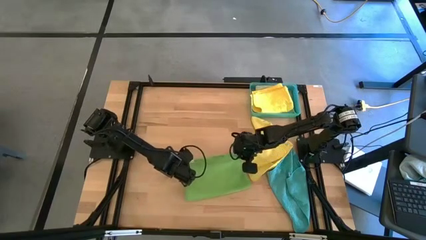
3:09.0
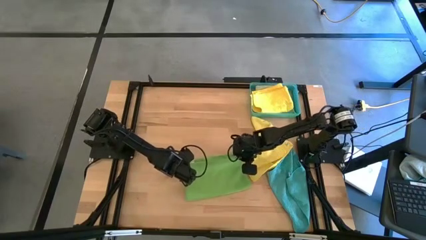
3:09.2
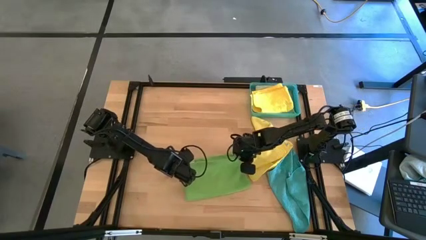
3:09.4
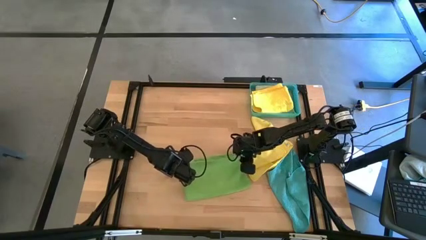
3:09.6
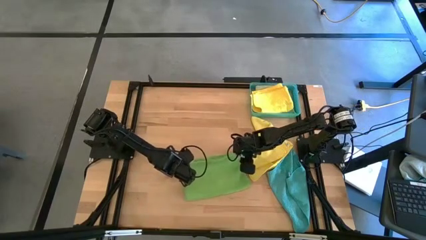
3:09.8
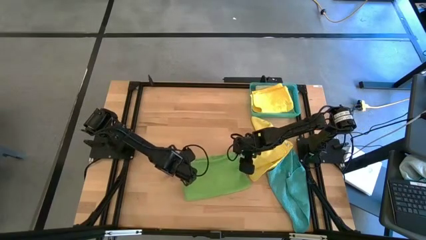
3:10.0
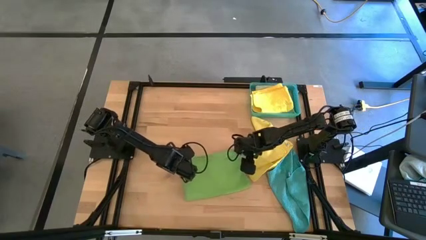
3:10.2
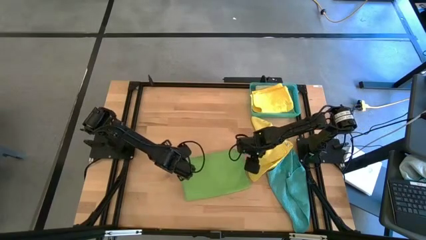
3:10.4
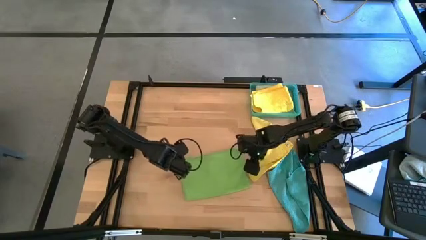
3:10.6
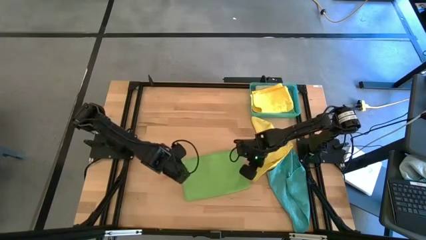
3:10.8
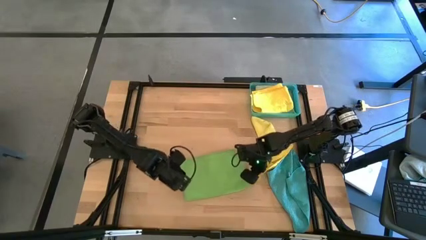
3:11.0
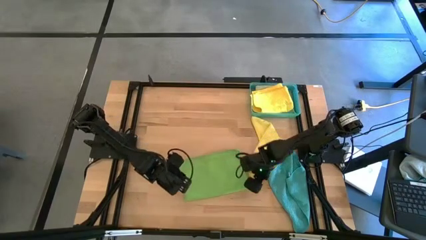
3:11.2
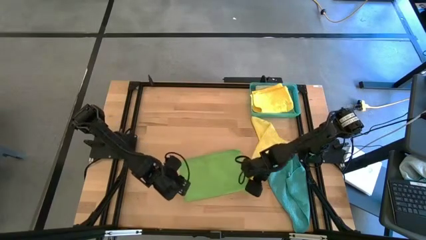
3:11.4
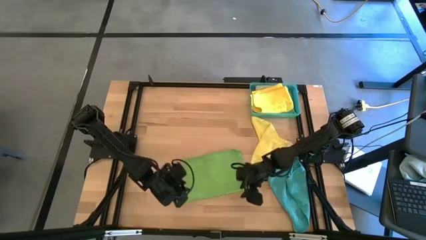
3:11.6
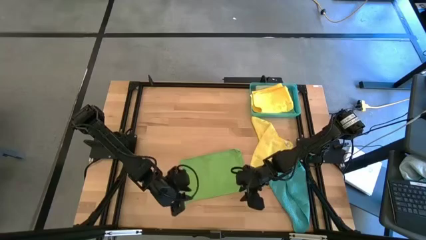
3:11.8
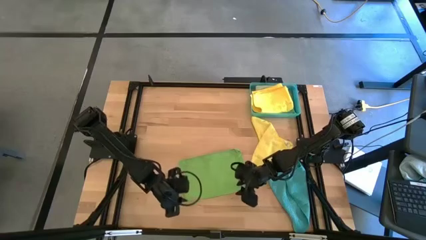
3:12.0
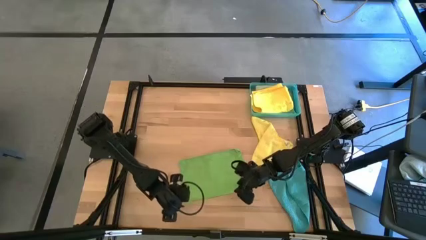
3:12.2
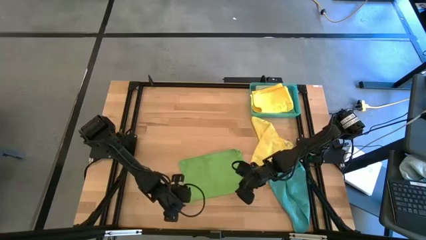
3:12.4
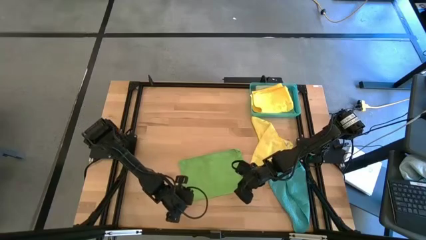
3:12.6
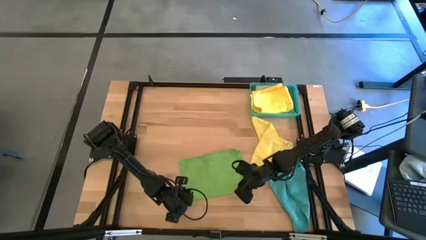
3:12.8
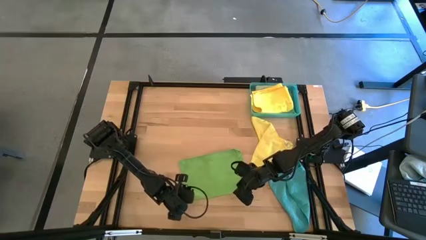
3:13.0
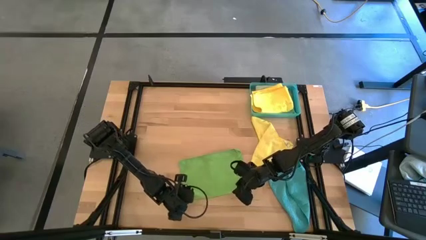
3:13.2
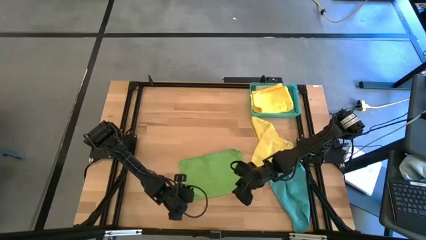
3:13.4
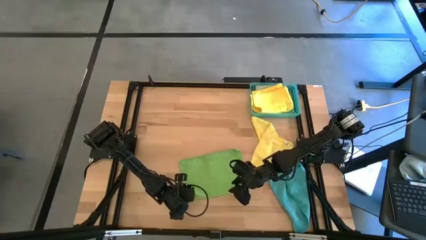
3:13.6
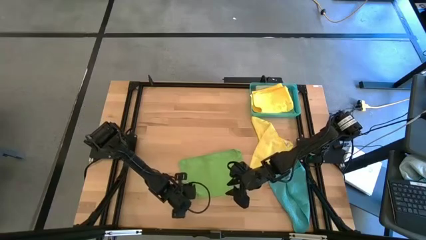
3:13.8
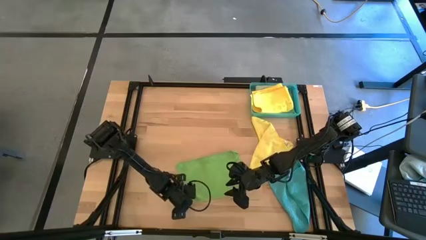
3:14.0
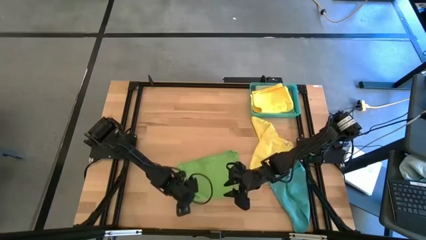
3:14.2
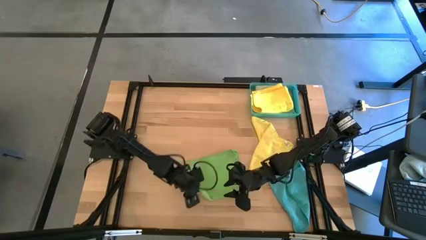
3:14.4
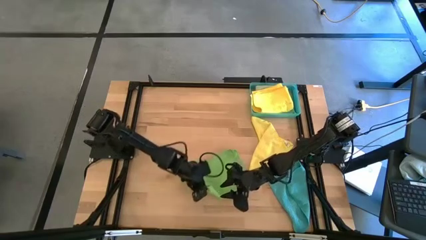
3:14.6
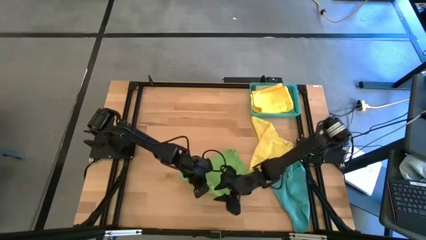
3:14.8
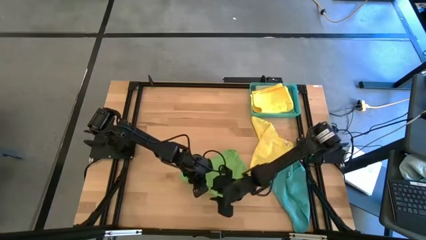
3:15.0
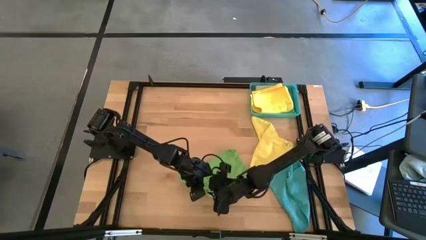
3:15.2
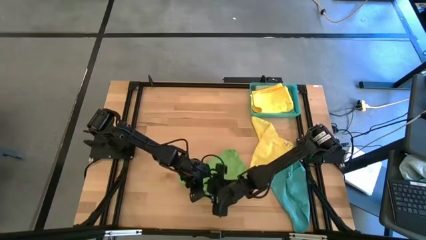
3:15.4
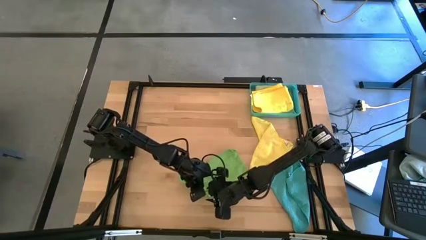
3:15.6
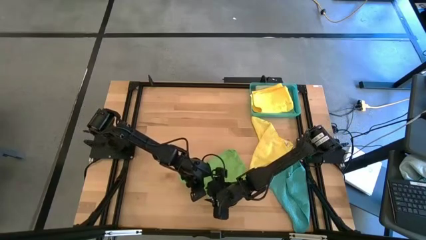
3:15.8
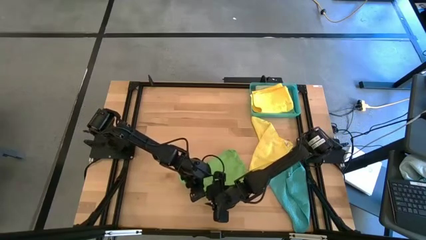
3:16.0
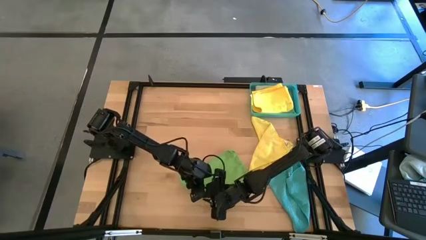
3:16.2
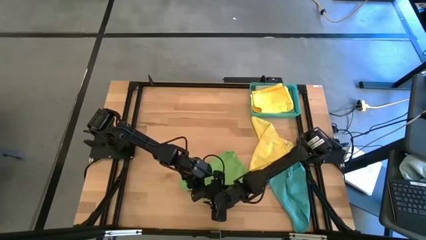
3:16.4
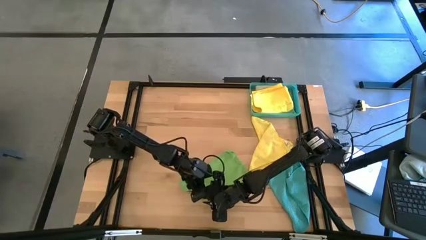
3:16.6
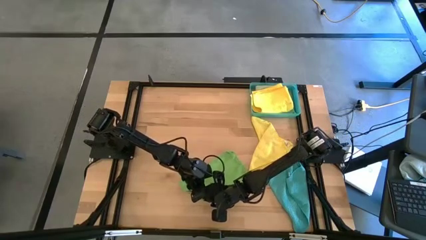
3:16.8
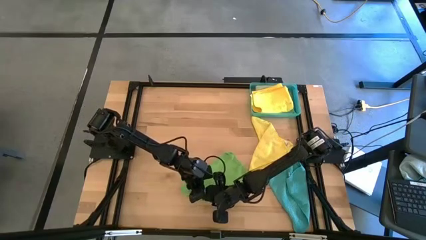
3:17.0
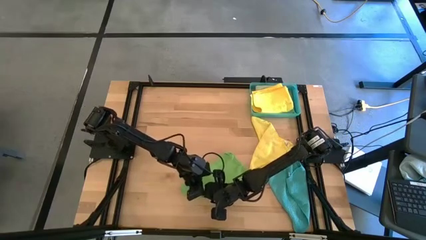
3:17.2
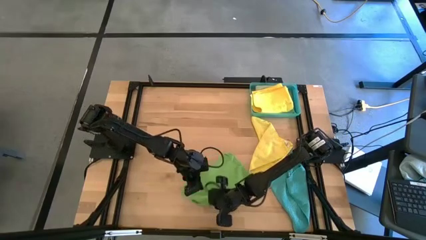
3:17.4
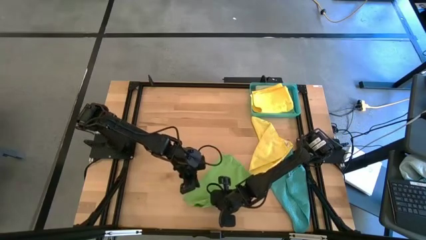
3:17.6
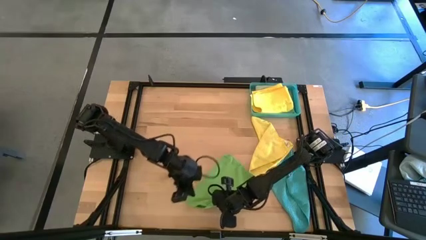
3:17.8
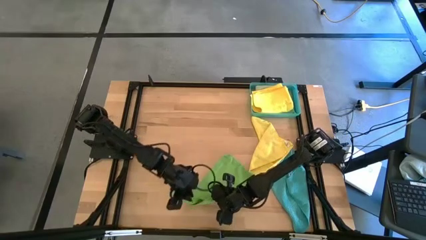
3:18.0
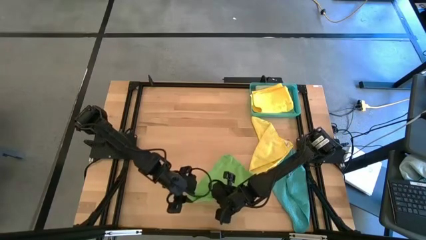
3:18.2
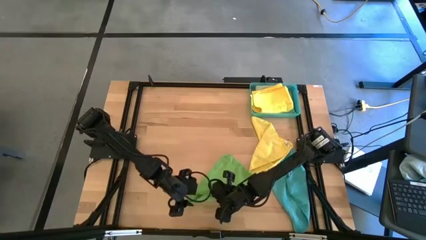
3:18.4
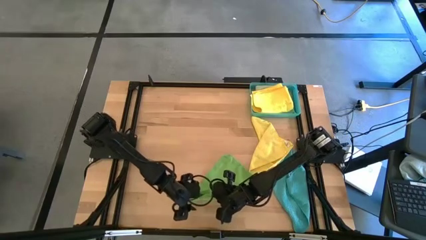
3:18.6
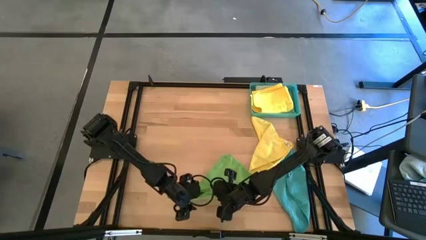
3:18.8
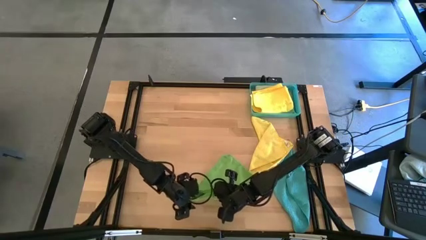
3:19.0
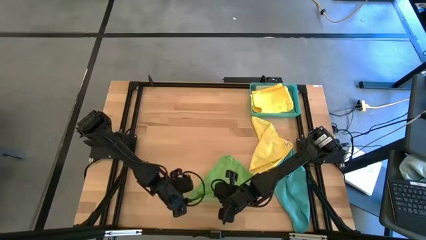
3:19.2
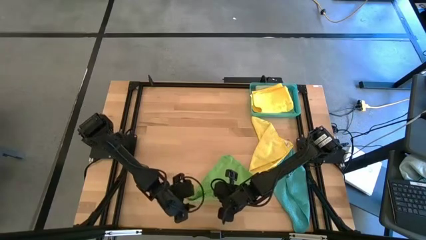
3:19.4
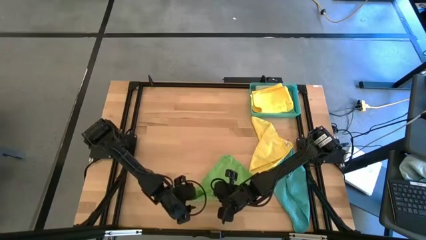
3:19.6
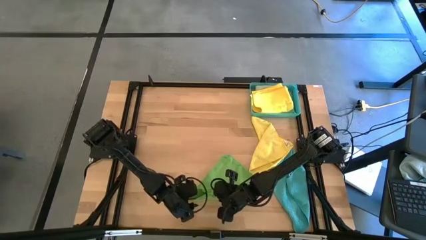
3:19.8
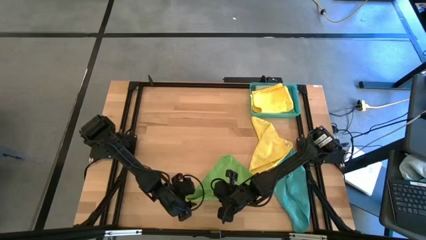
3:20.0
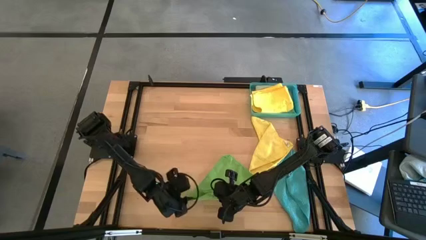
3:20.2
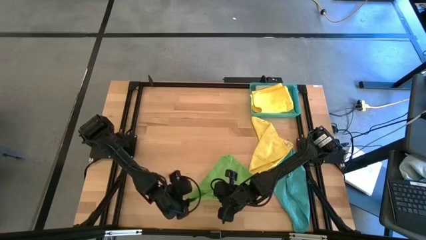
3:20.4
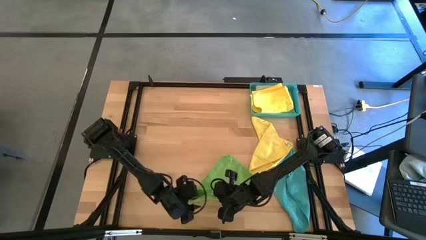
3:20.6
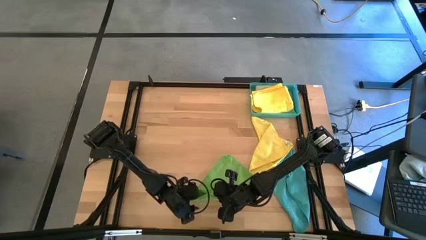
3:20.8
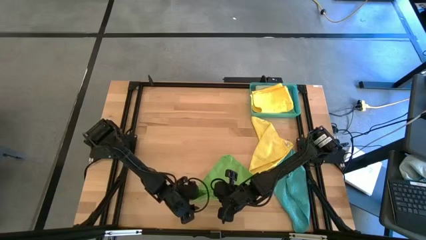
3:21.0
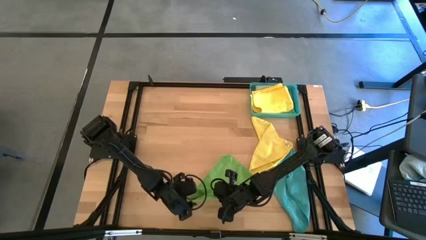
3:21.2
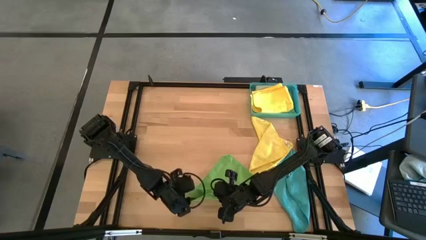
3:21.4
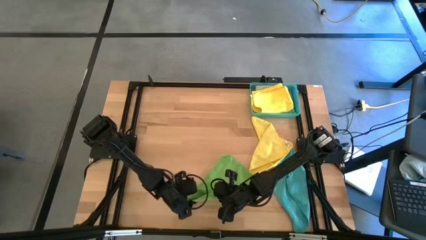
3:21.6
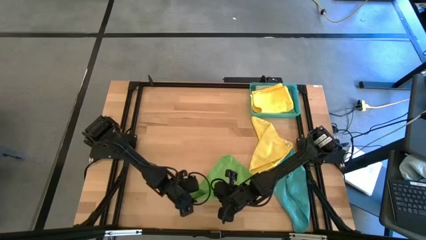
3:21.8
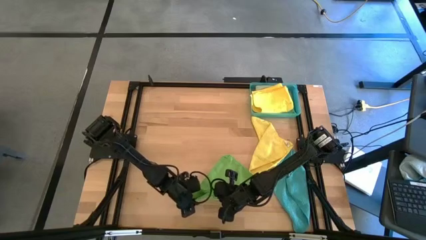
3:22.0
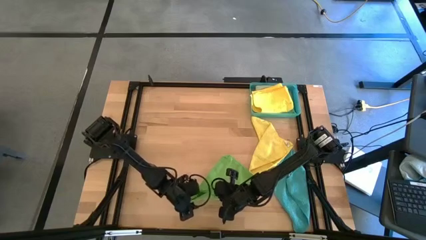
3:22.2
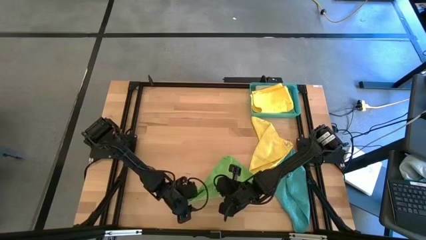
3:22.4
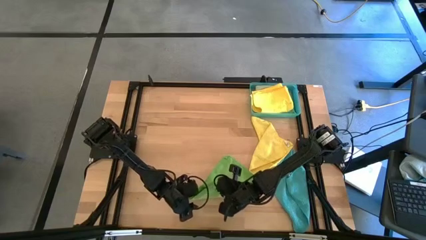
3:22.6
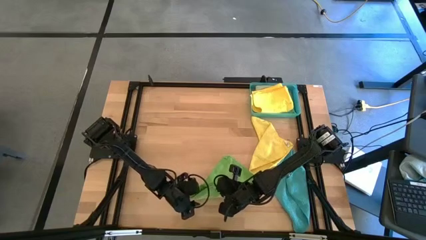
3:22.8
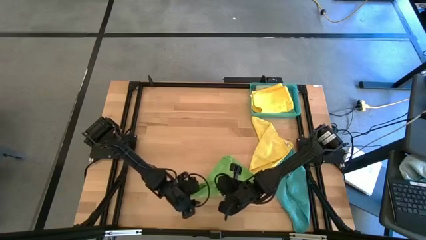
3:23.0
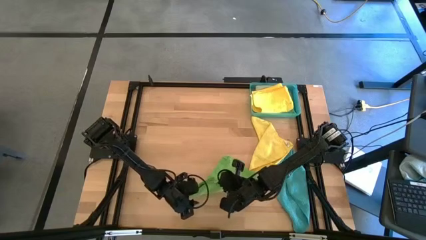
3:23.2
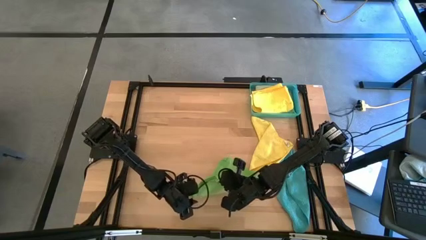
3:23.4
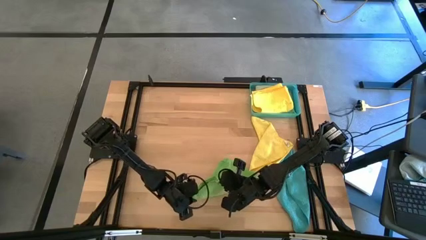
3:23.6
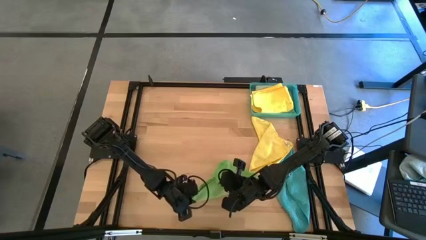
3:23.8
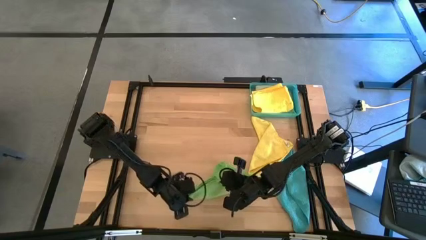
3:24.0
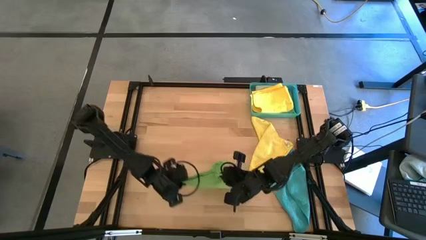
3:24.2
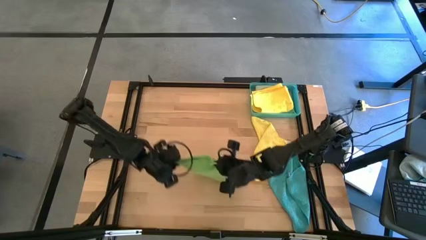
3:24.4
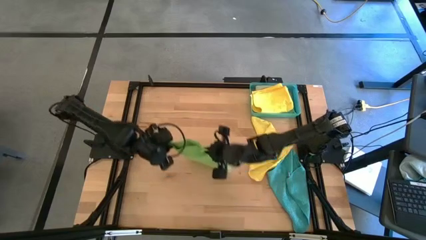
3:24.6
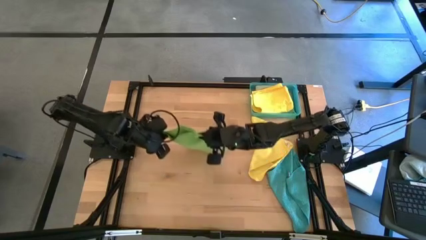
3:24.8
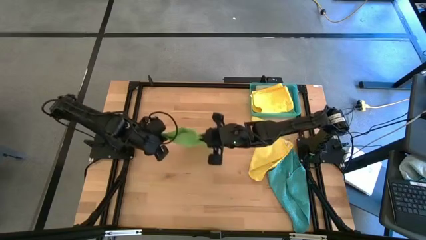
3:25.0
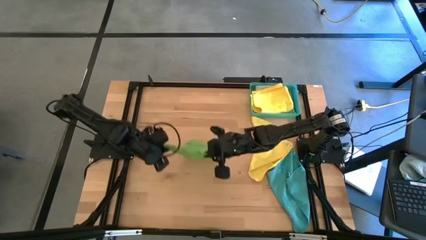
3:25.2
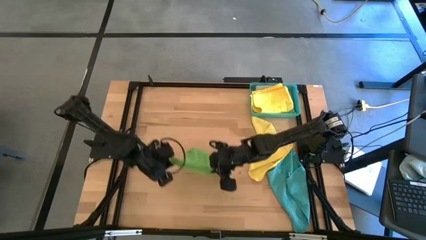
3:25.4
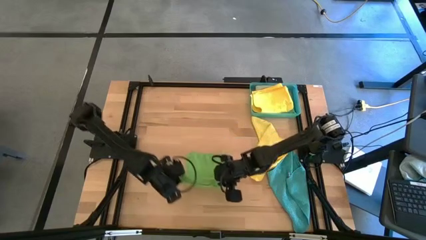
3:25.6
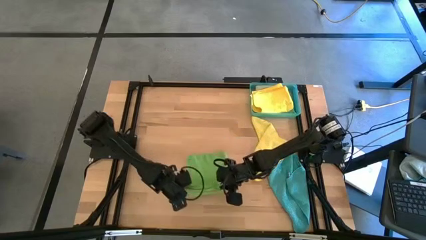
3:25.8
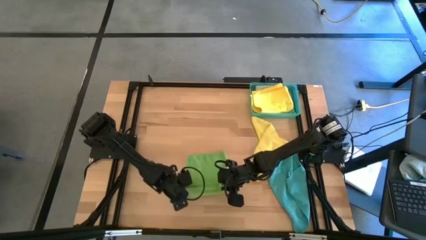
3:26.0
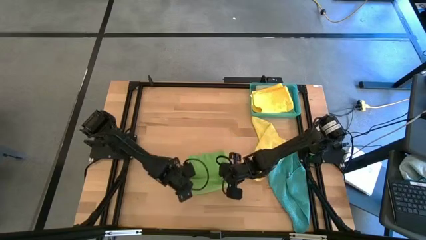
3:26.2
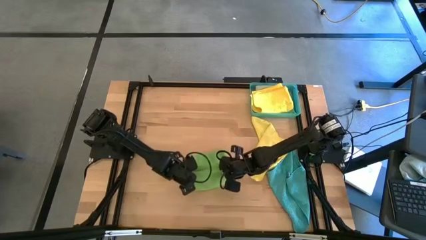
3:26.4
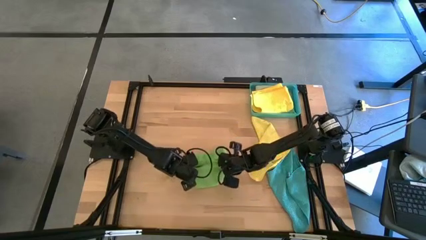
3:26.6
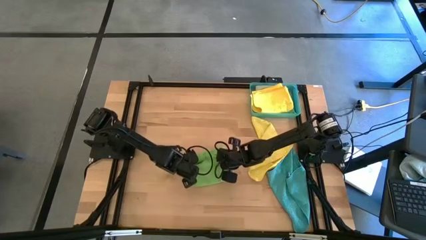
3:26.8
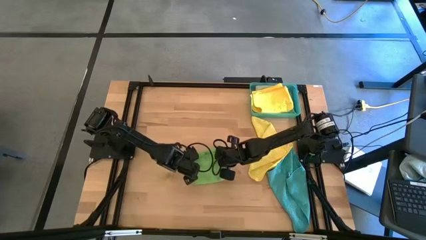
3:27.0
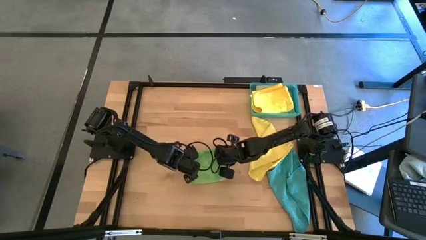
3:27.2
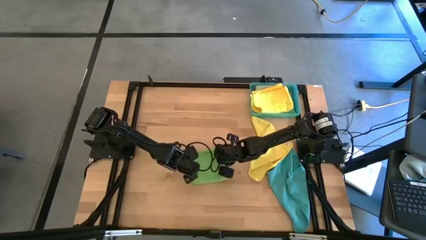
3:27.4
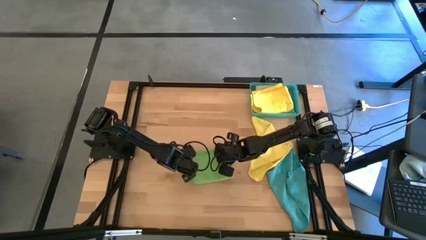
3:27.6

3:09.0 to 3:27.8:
Task: Fold microfiber towels
Fold the green microfiber cloth
